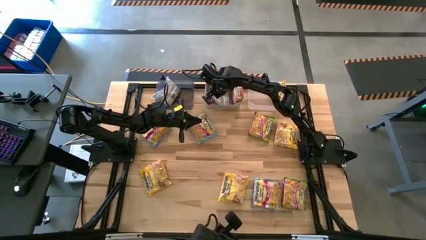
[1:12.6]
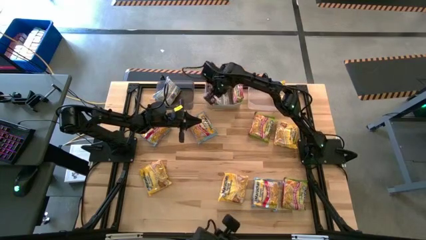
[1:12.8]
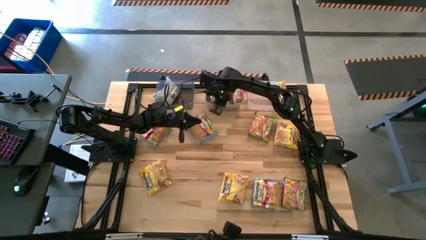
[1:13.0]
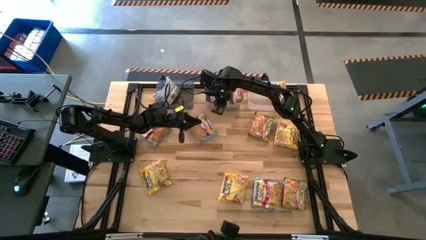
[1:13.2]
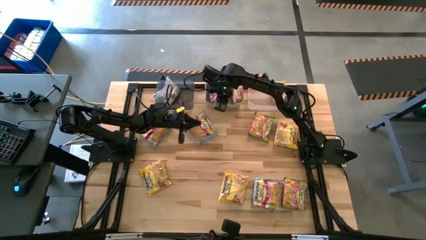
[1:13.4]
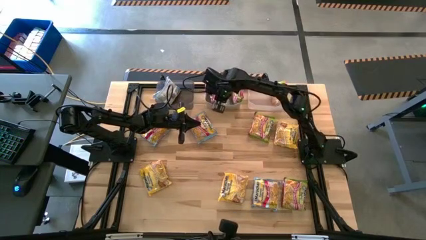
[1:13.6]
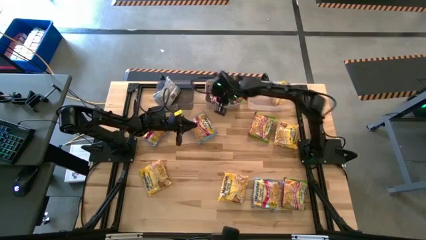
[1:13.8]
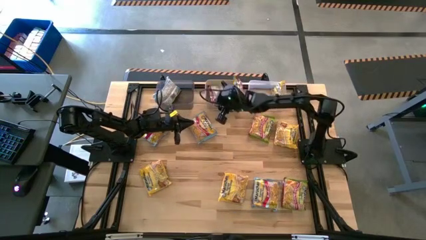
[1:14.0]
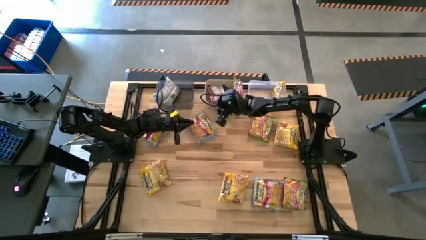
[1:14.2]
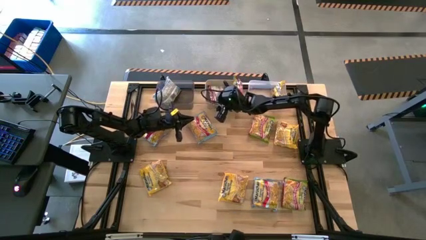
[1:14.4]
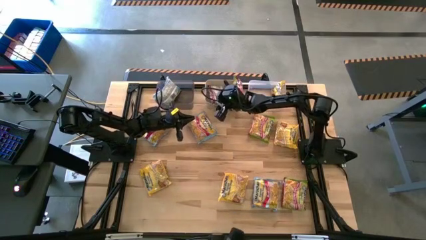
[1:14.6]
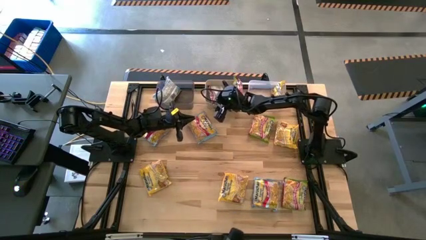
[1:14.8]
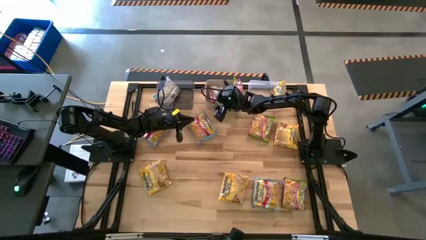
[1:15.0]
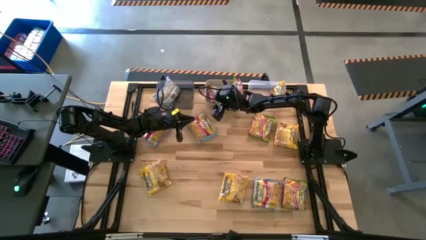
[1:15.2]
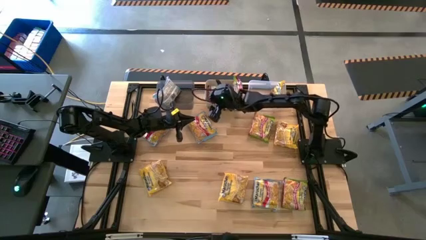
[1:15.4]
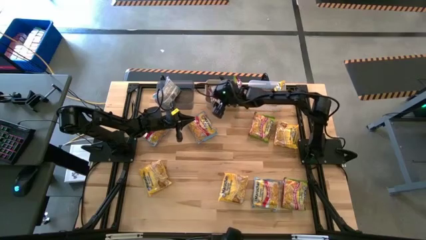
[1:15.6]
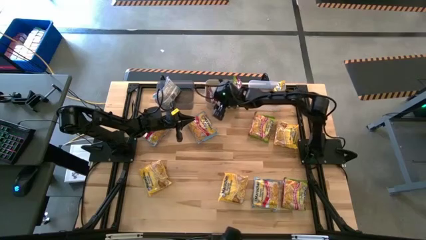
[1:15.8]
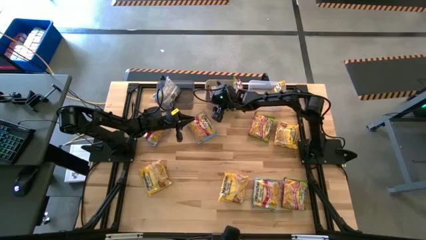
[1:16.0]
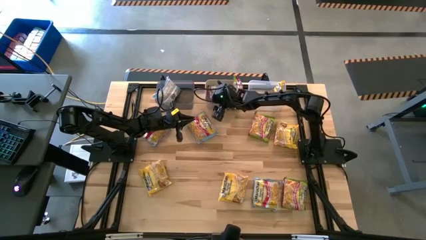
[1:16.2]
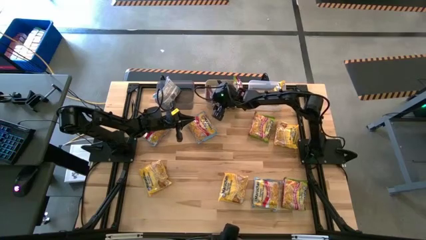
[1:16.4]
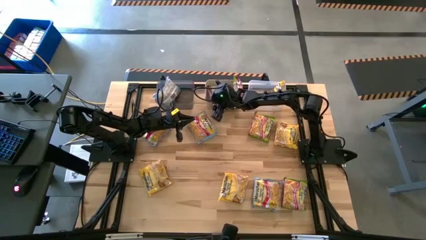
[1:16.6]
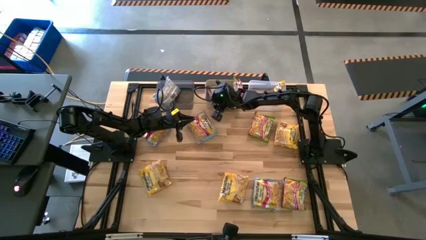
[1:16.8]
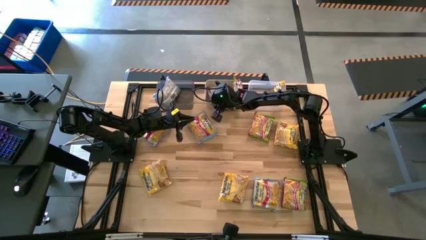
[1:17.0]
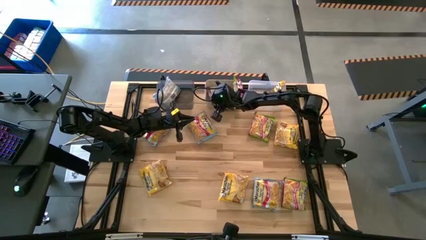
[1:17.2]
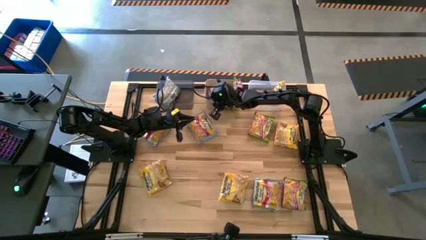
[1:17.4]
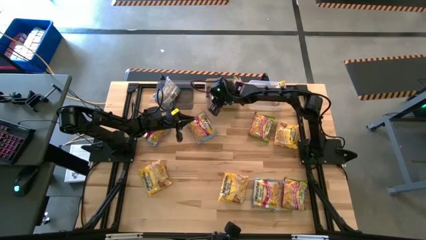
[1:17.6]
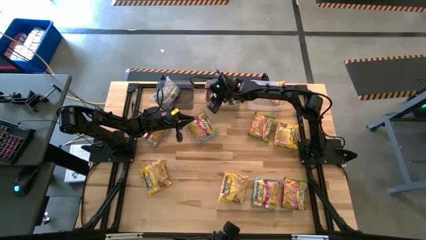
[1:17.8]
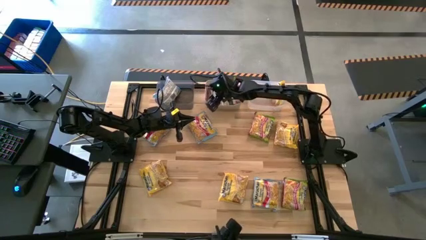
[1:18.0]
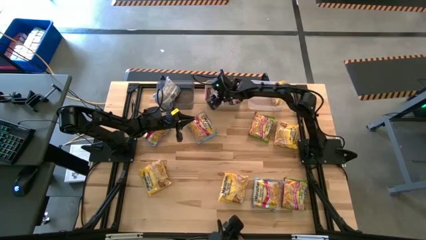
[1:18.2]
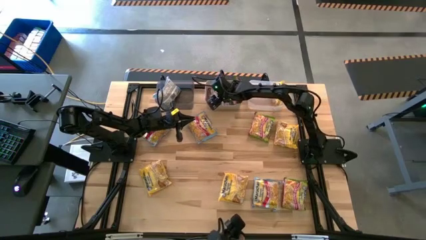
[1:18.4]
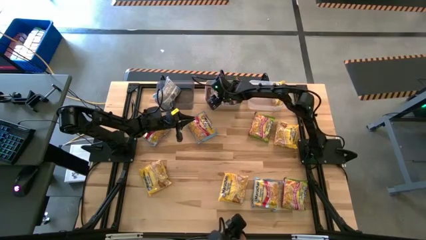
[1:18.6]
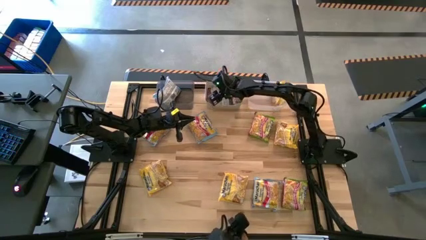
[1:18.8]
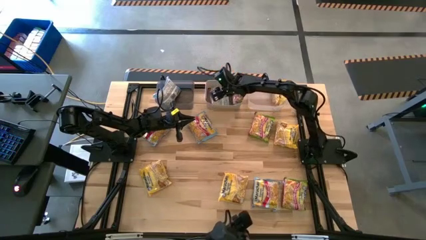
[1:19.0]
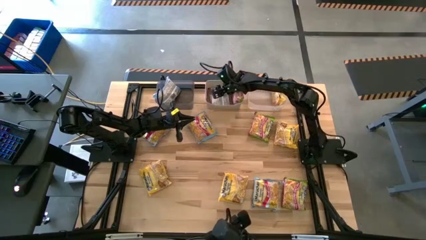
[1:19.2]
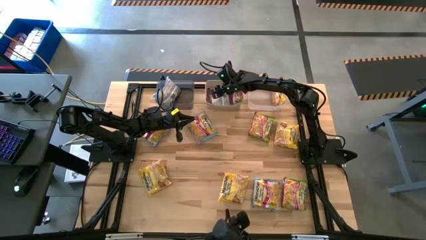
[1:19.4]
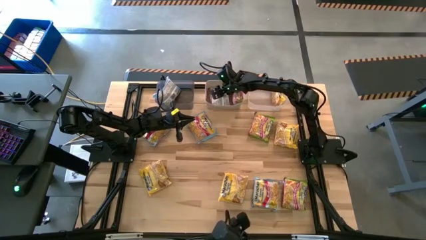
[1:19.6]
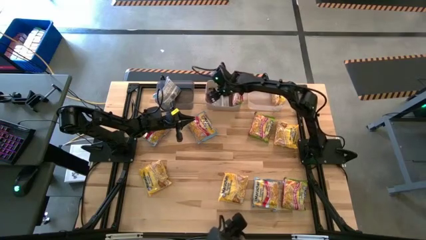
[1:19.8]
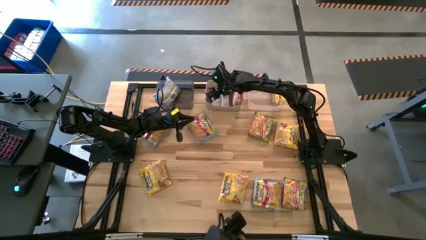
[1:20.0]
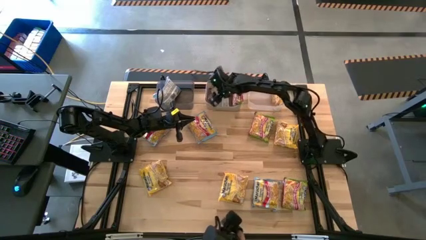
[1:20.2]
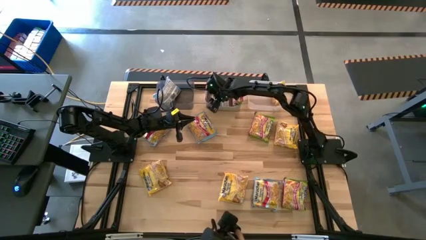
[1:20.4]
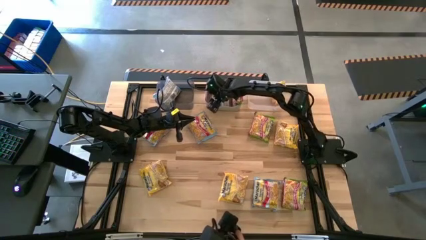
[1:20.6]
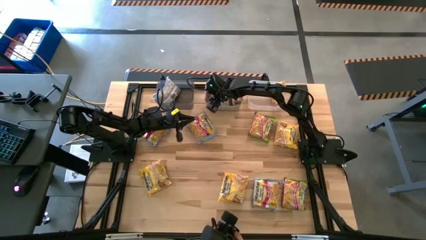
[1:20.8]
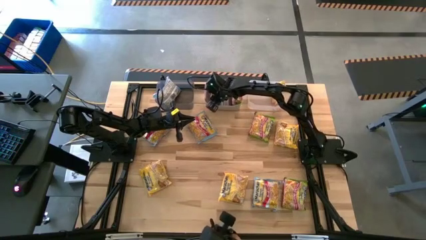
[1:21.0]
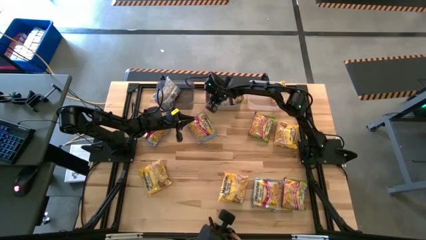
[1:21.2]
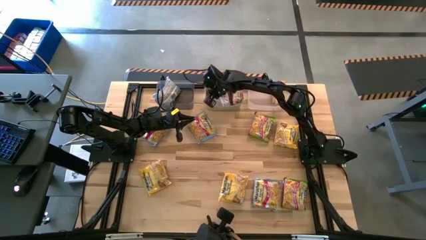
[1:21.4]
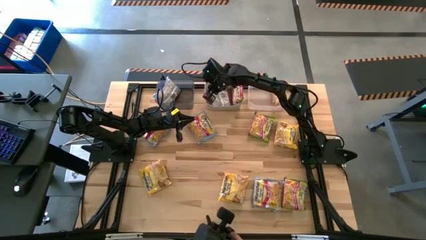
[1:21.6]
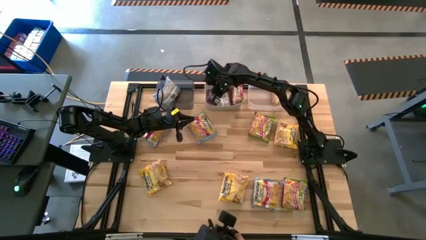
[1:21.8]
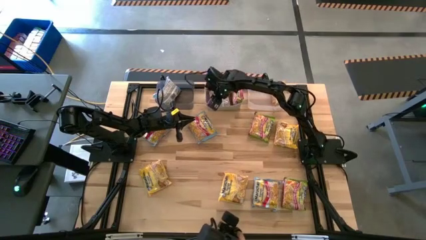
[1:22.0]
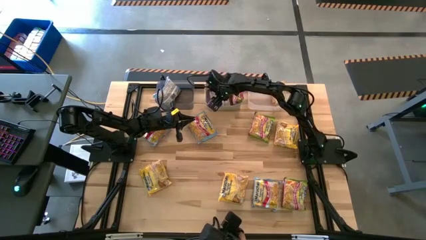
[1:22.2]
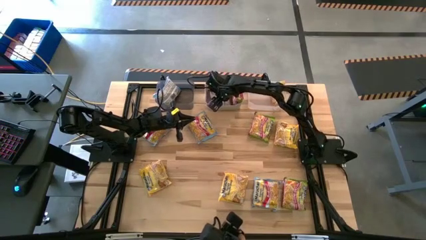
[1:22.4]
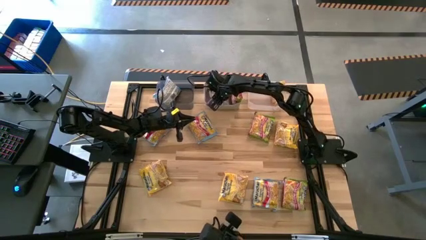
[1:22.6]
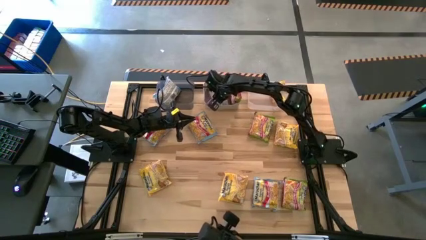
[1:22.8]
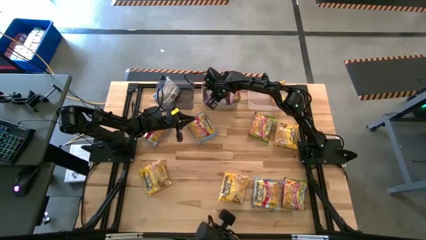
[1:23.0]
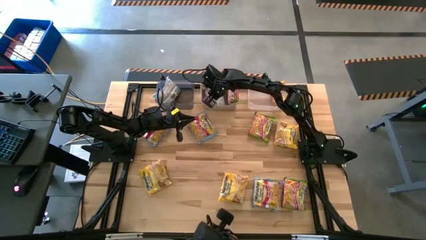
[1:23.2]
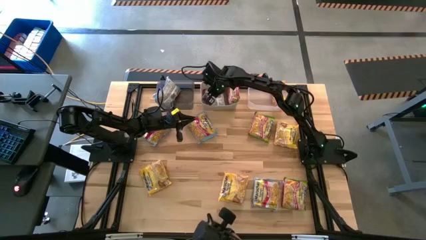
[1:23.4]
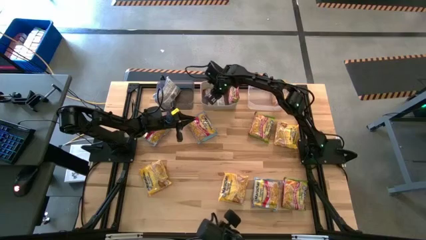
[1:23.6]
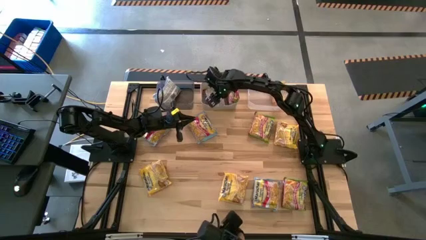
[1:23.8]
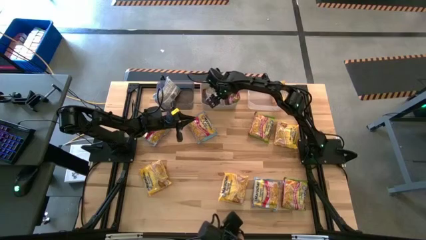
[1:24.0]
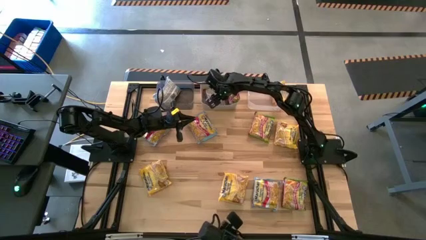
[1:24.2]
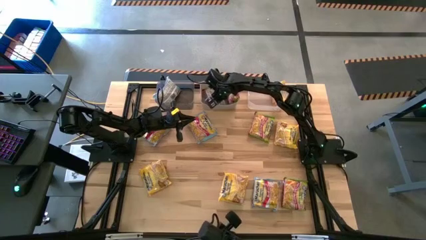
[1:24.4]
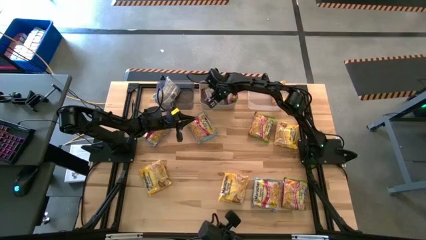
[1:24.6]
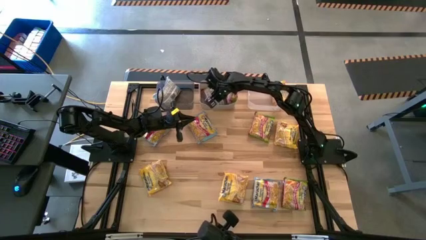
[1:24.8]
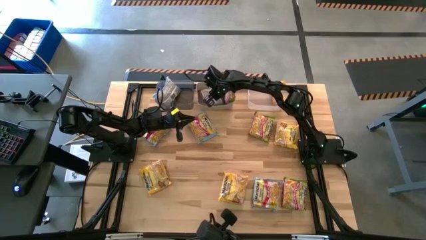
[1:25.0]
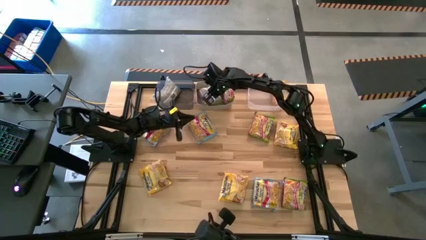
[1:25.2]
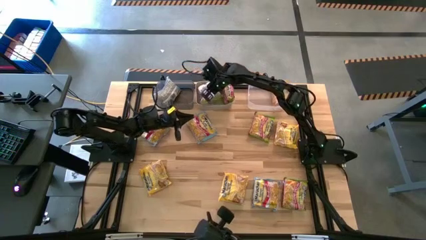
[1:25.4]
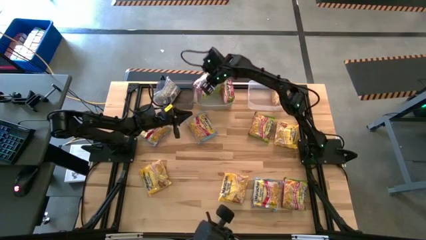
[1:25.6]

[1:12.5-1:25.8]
Task: Sort Maruchan noodles
Put the left green noodle pack into the gray bin

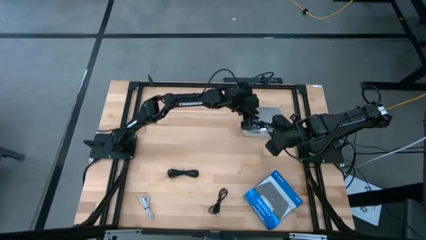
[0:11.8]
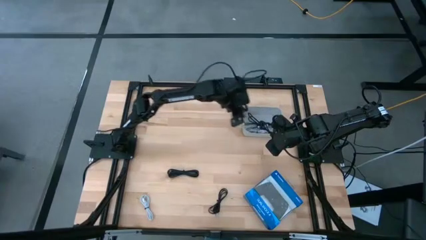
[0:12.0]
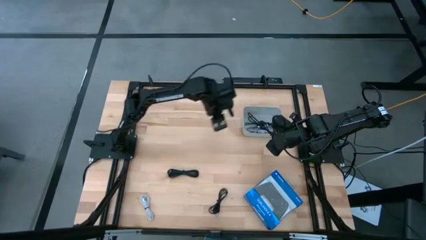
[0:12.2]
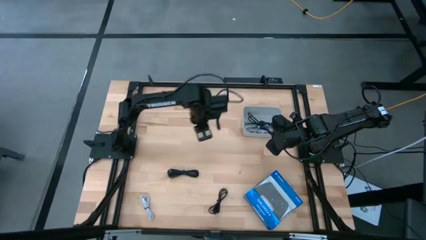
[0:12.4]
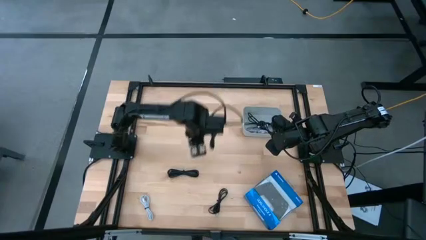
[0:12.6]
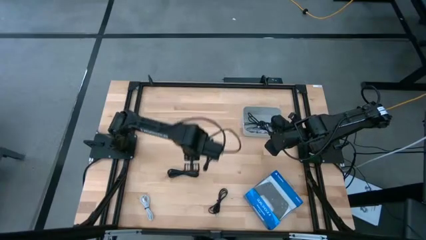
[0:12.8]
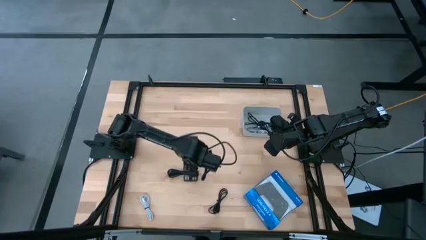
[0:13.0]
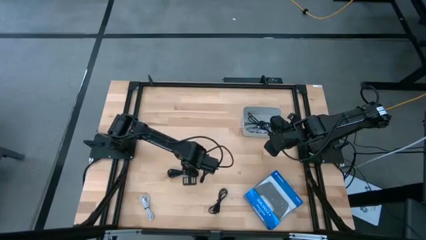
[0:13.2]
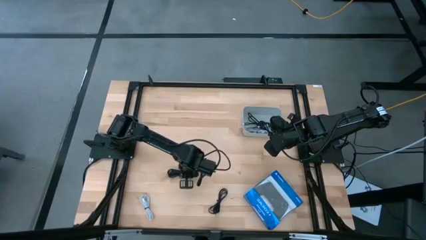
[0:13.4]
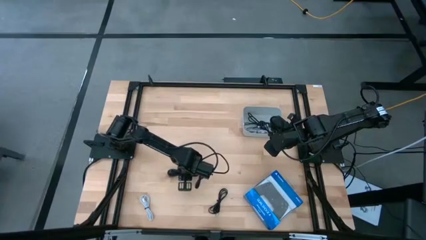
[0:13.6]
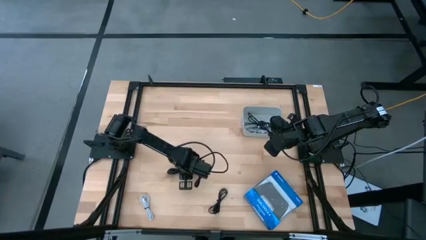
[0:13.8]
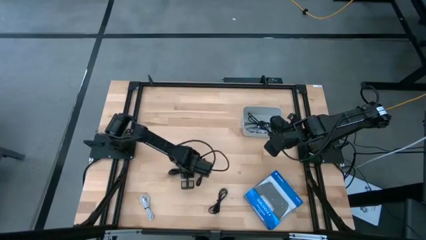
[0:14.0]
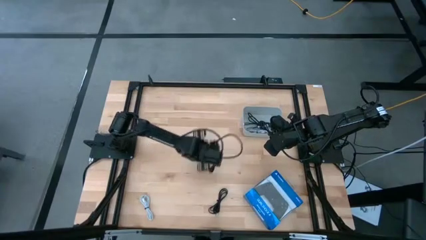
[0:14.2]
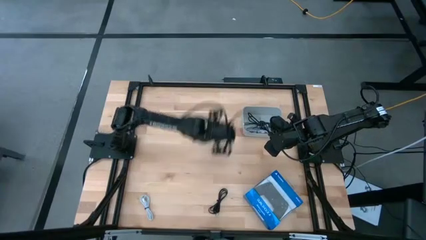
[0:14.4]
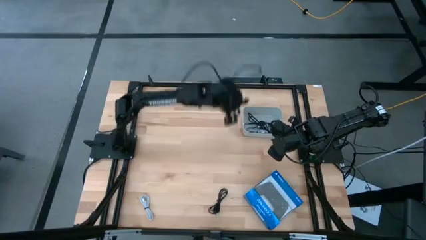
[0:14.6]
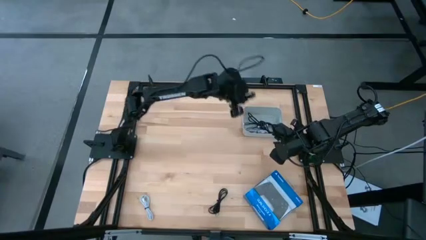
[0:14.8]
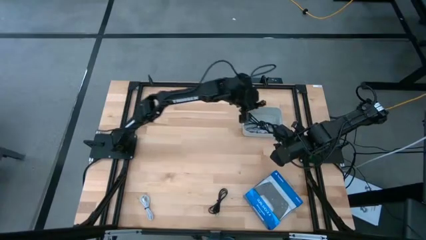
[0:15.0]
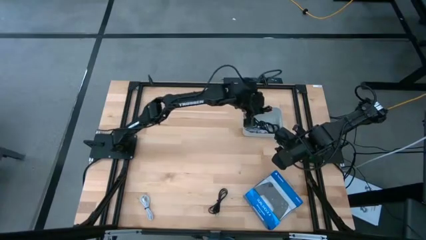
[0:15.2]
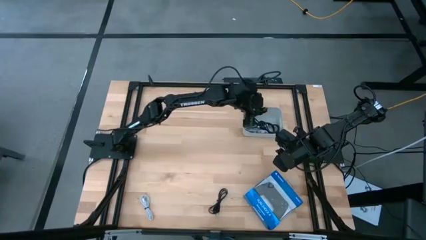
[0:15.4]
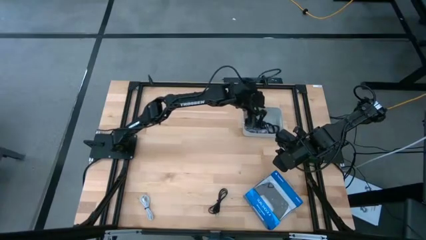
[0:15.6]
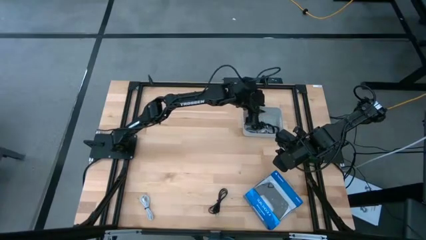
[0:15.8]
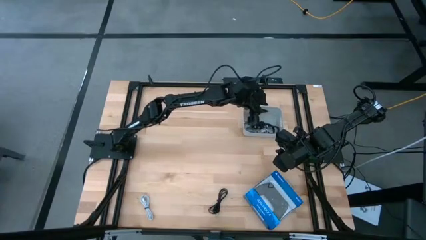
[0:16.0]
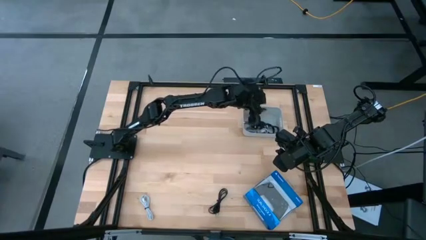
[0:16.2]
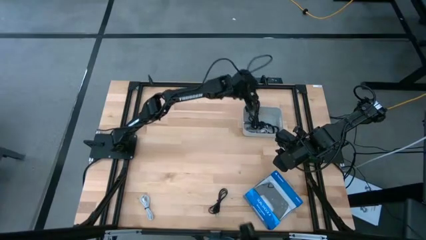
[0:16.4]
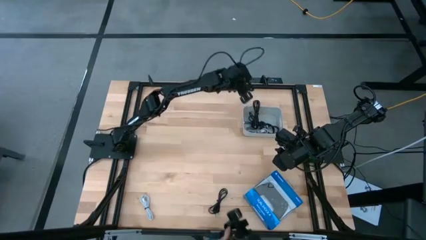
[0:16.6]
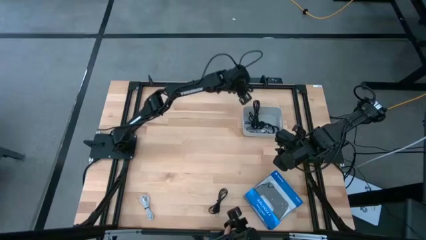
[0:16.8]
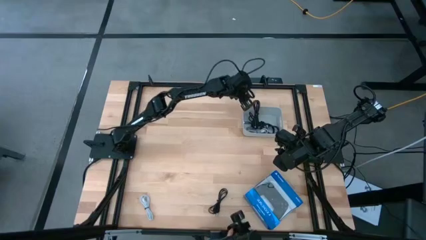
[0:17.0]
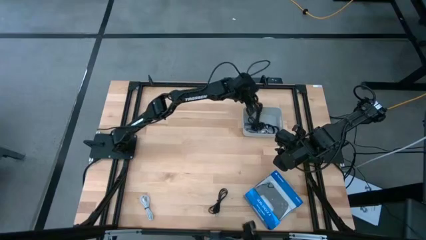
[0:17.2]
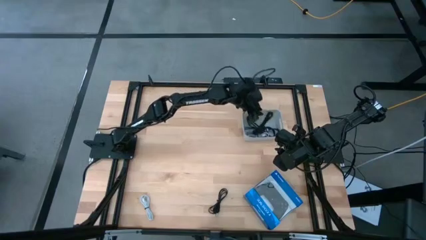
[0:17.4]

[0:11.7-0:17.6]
Task: Pick and place USB-C Cables
Put the top black USB cable into the gray bin
